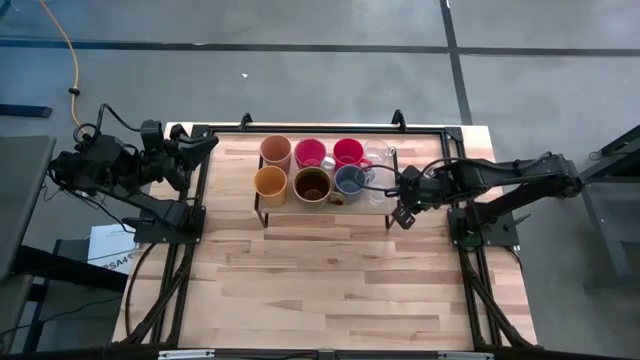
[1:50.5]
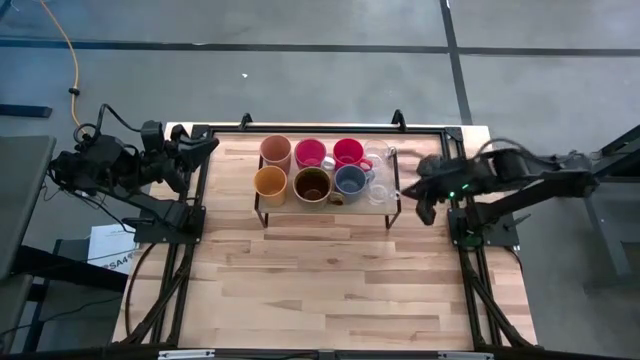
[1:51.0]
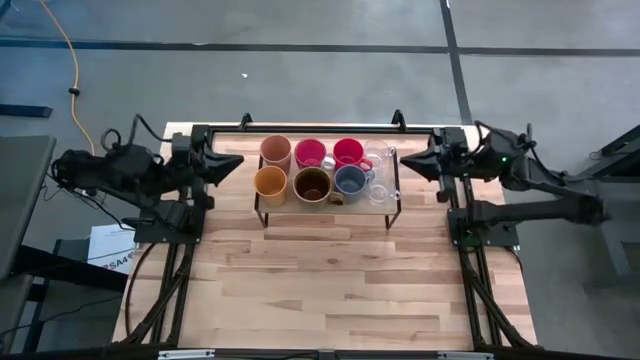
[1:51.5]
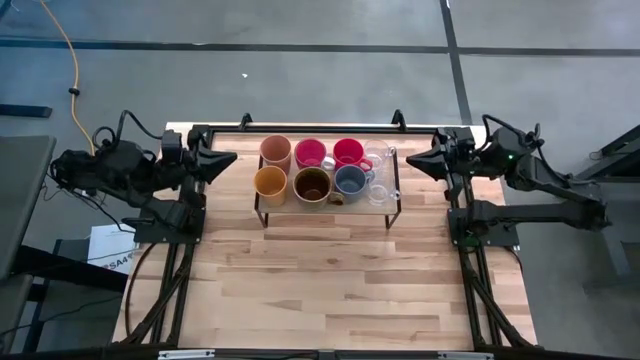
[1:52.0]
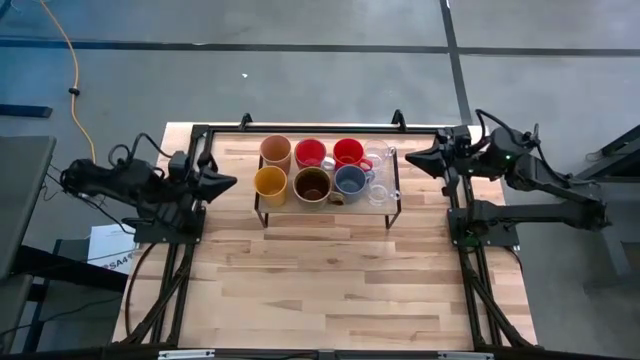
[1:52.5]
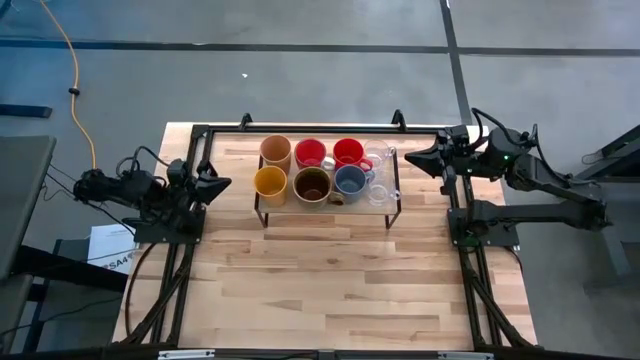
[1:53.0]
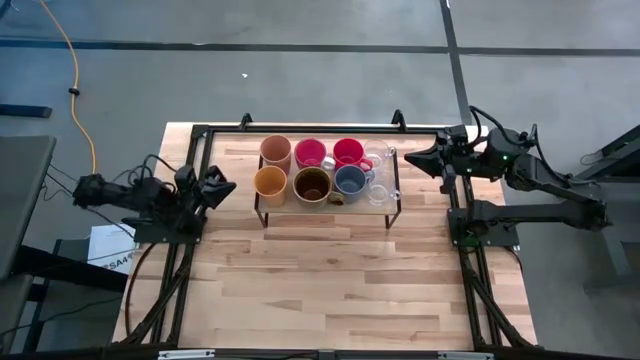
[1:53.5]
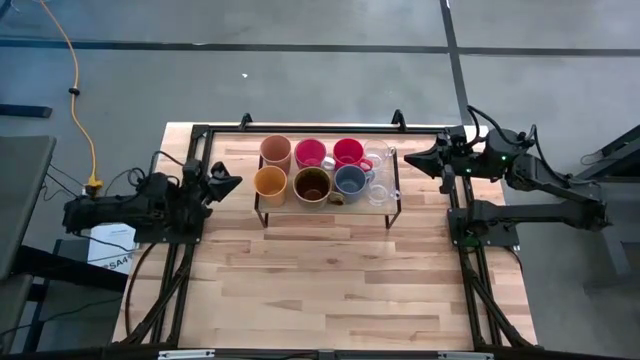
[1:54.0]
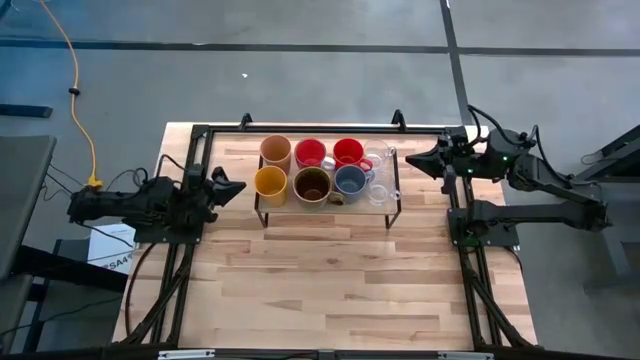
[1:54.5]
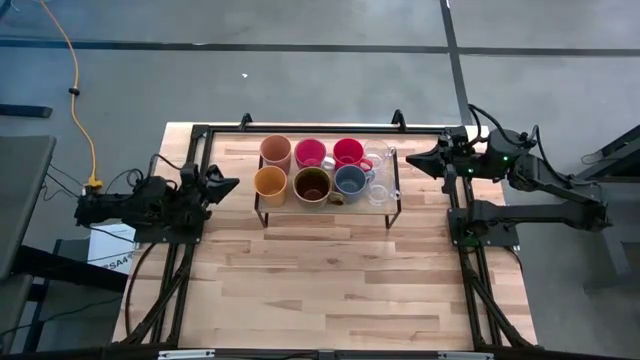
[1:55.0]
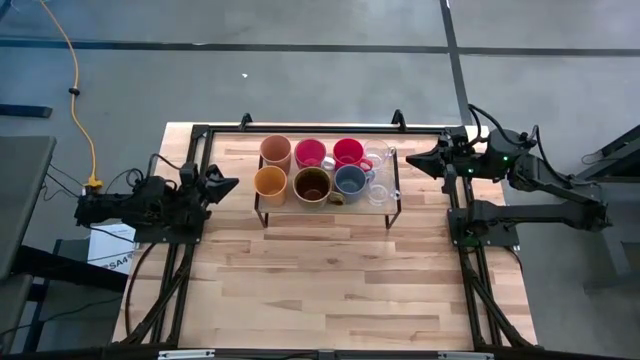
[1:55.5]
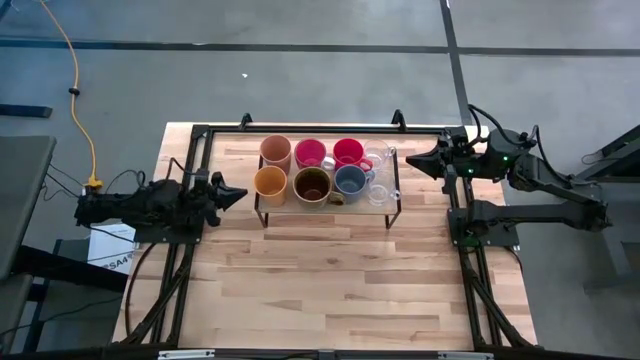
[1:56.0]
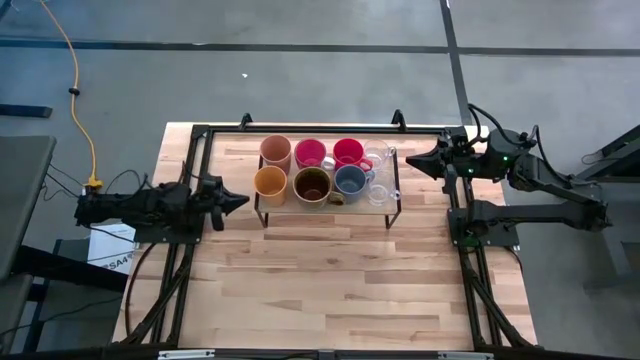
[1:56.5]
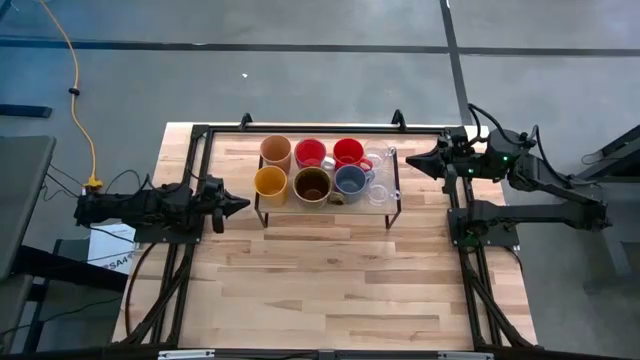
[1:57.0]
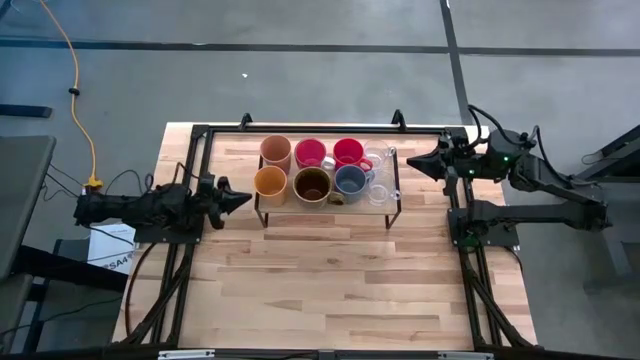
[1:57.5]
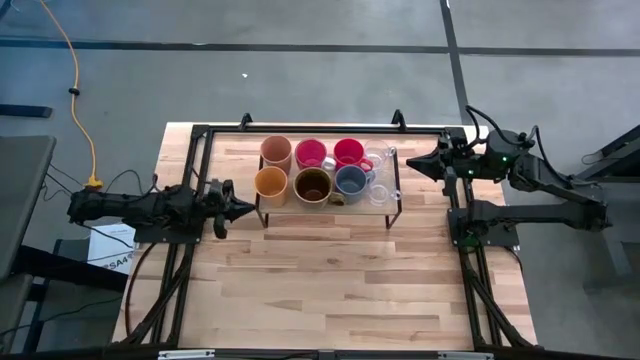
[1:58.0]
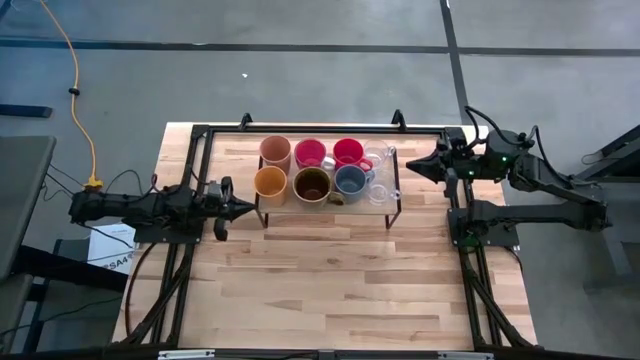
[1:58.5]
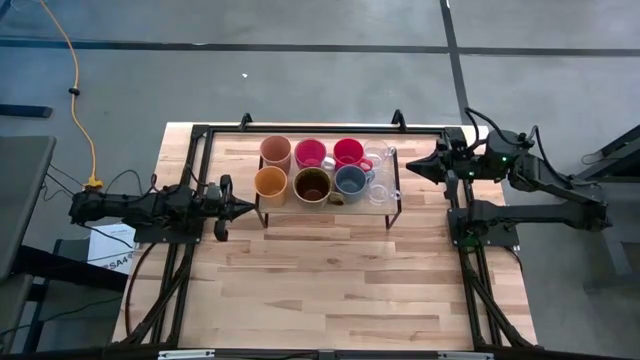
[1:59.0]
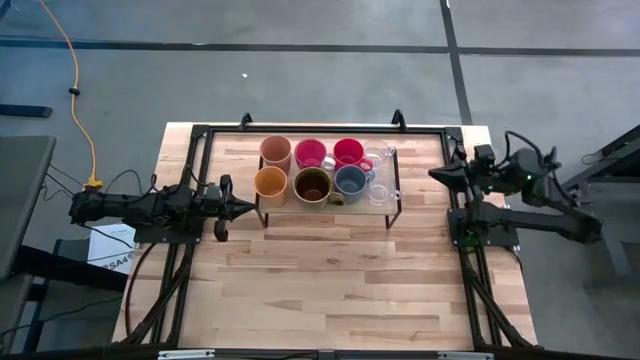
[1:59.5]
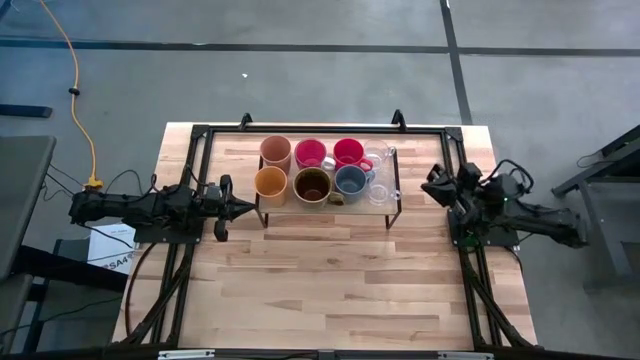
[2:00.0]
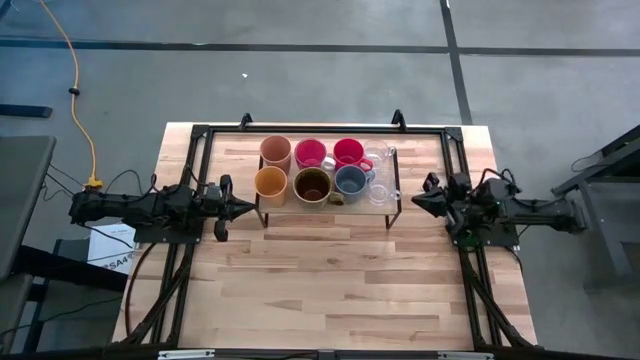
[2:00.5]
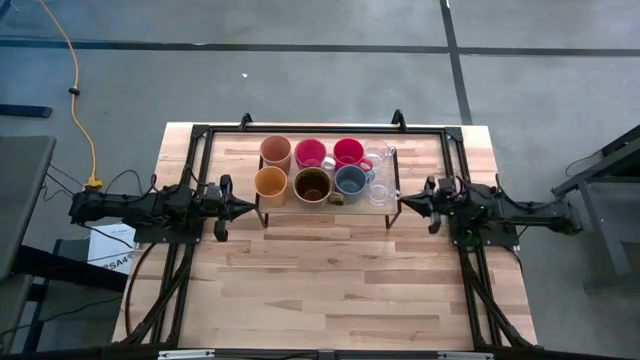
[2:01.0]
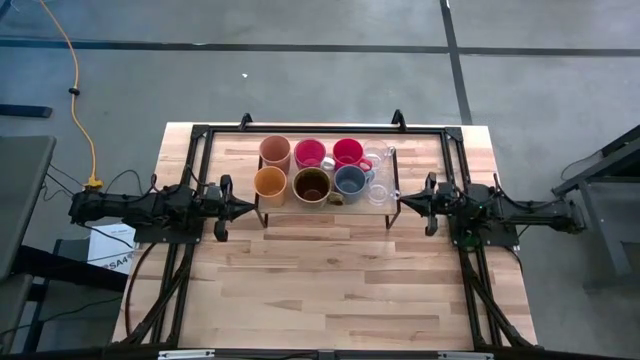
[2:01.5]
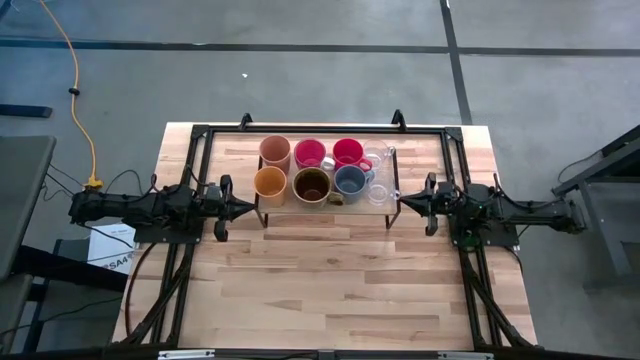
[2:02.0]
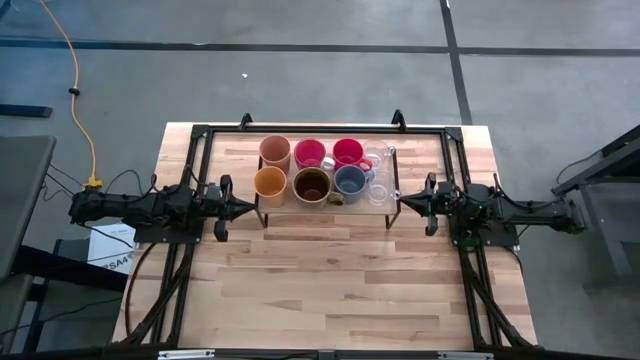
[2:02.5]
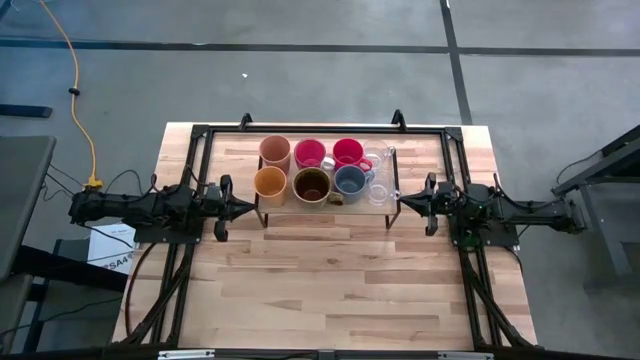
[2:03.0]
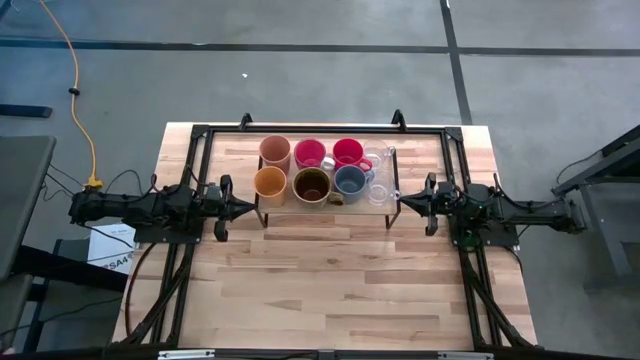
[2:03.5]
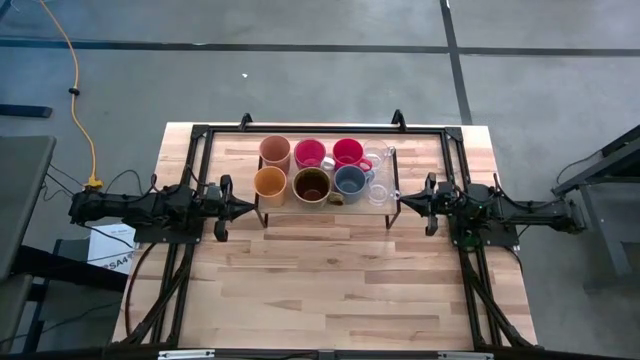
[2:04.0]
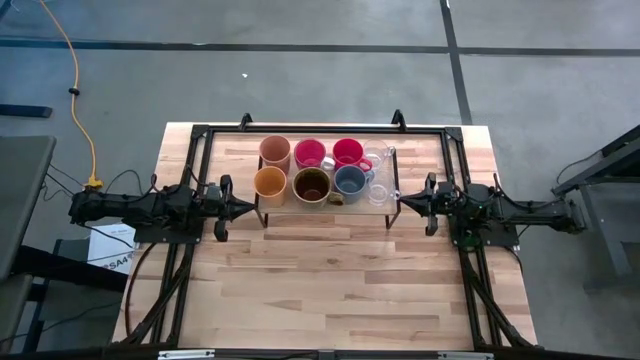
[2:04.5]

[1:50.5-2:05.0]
Task: Stack small to large cups/mugs on shelf
Return to Home Position

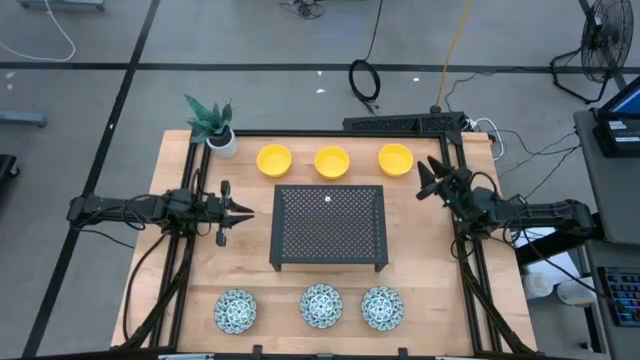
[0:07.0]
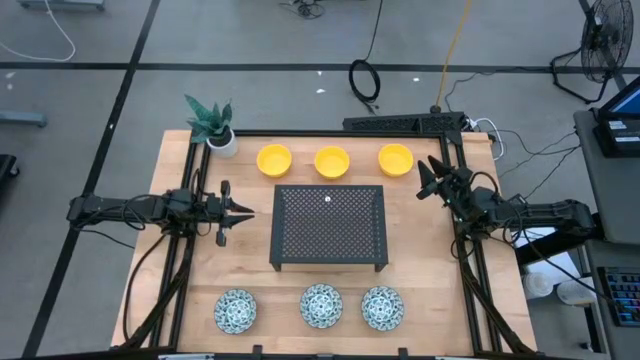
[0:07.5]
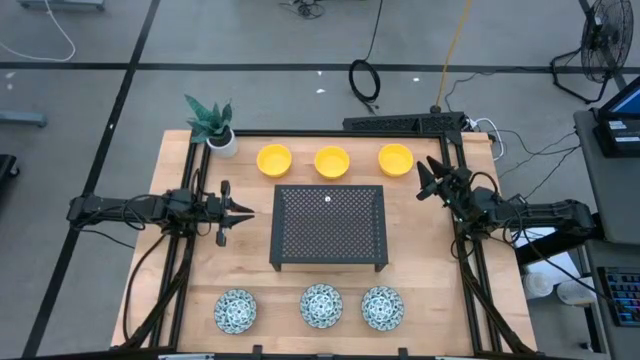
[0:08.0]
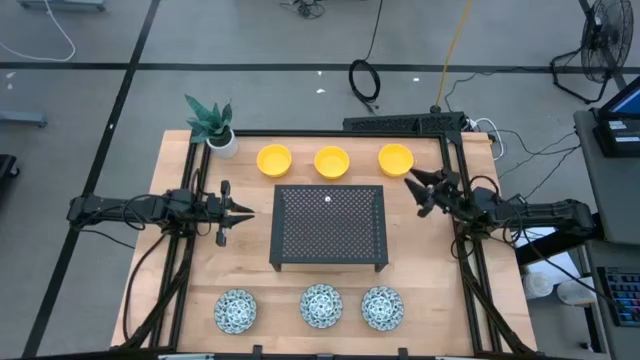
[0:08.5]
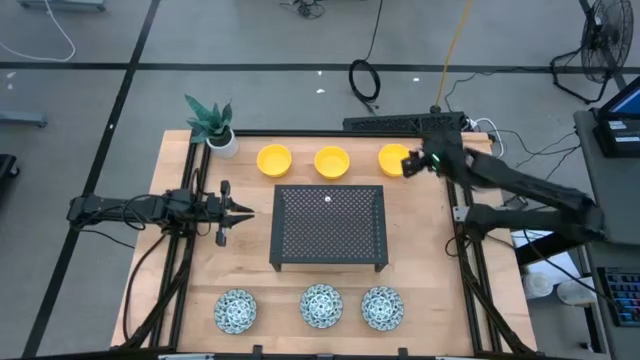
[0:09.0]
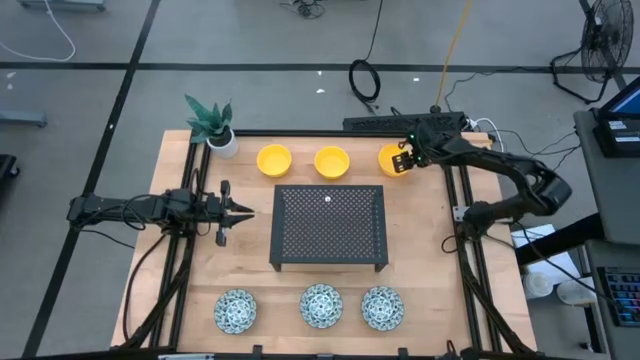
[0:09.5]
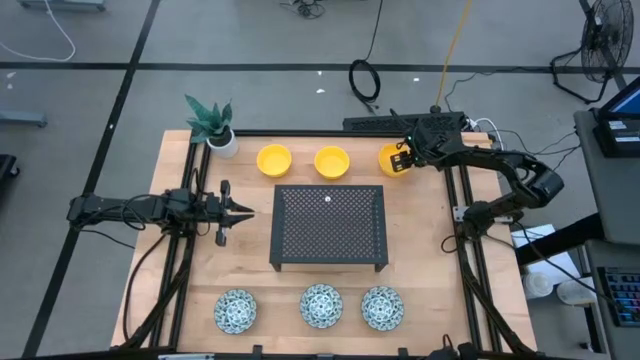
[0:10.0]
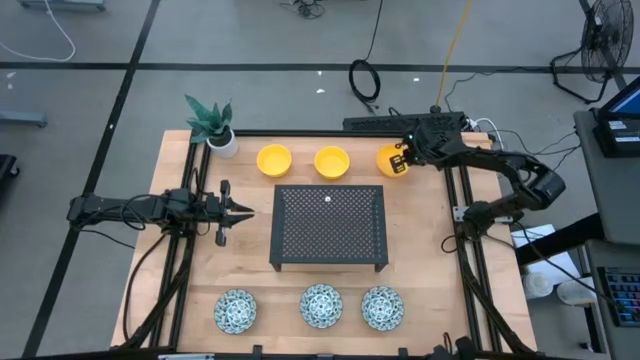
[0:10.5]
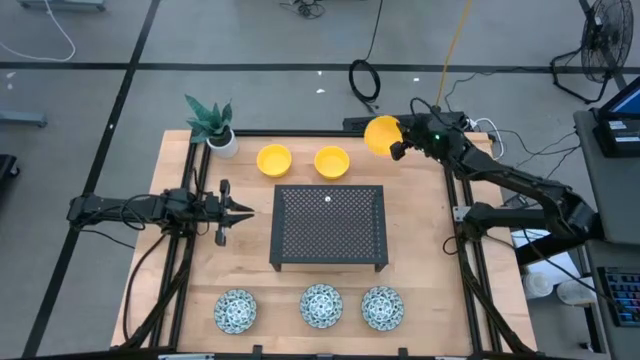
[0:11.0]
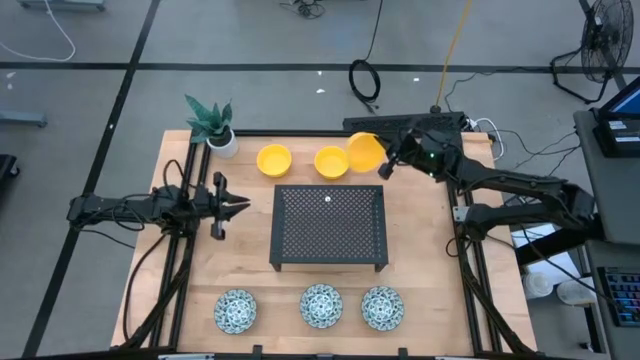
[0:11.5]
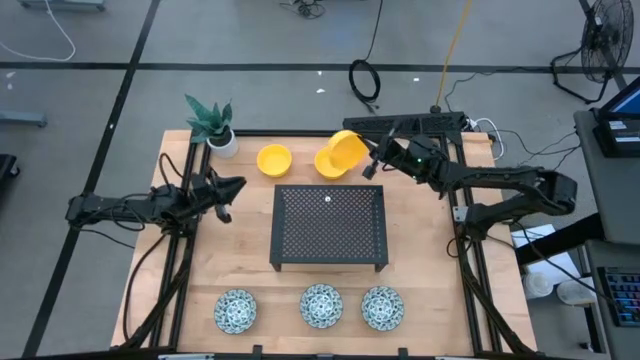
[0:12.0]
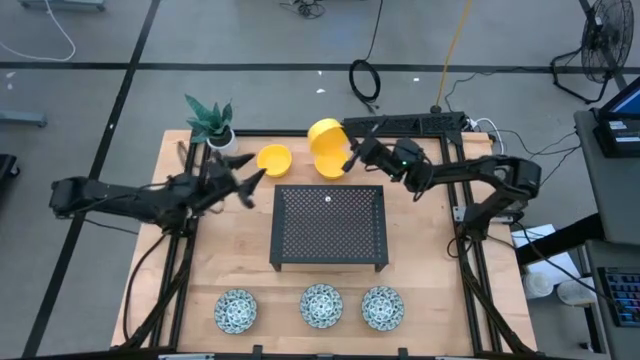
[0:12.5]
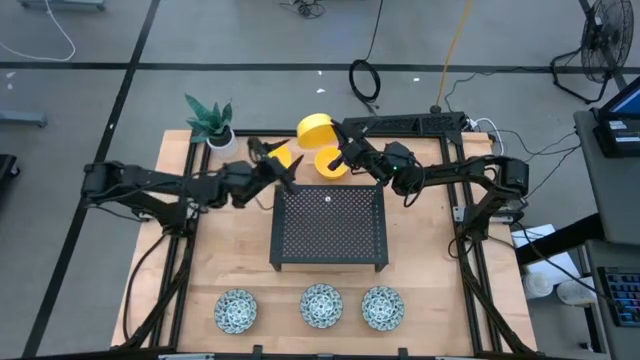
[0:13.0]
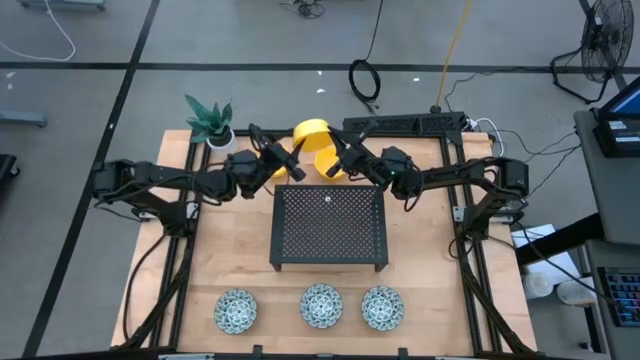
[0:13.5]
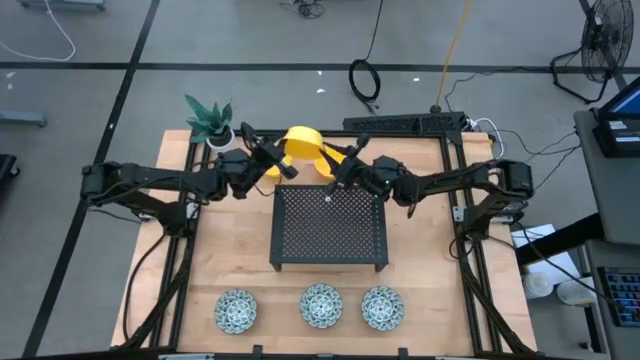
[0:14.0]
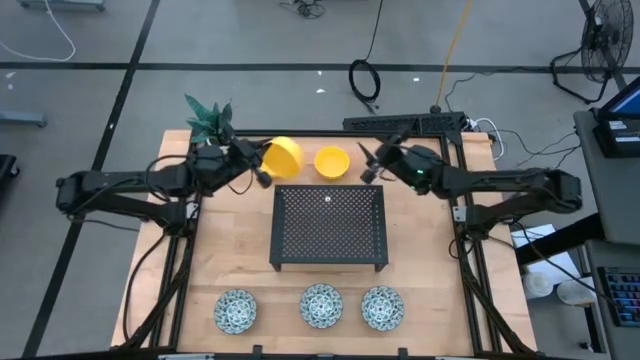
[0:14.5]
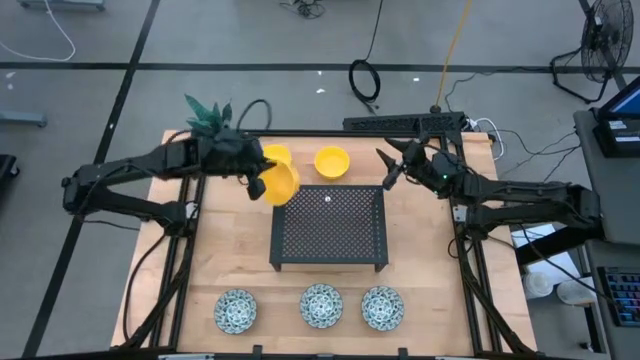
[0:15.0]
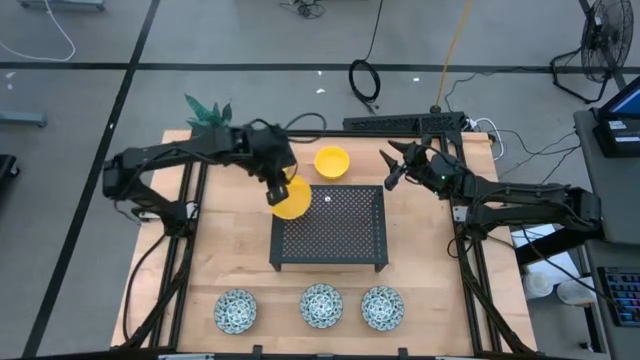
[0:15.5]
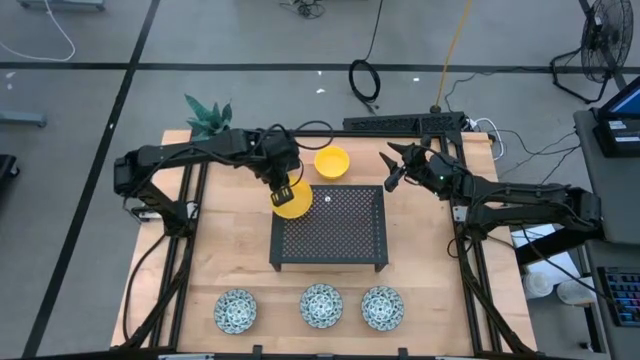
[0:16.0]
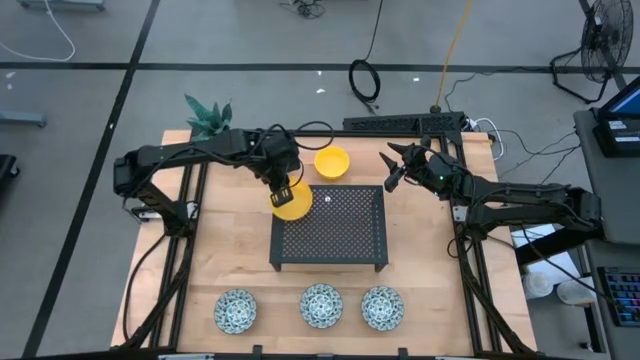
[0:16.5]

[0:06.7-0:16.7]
Task: Pick & Place Mini bowls
Put the right yellow bowl on the shelf
